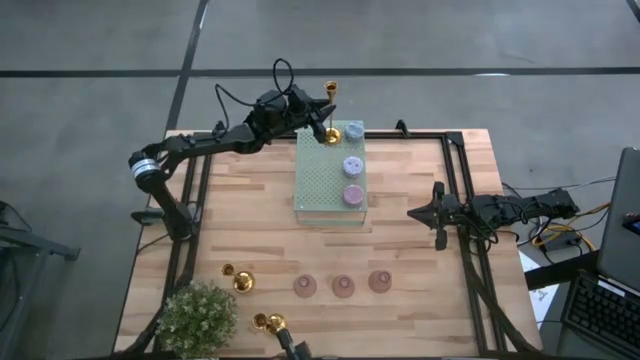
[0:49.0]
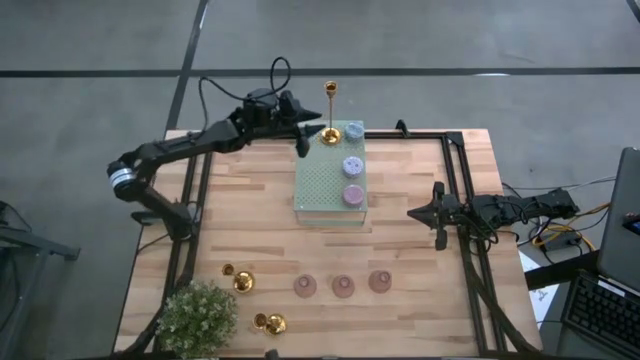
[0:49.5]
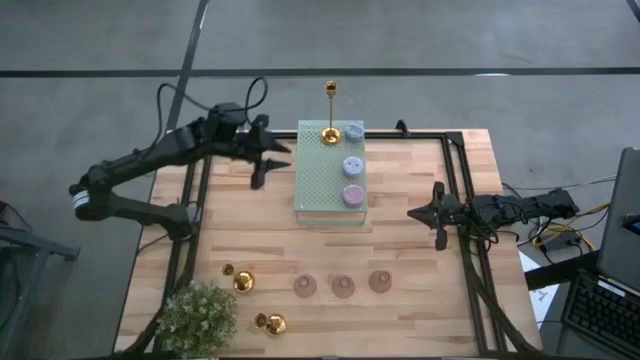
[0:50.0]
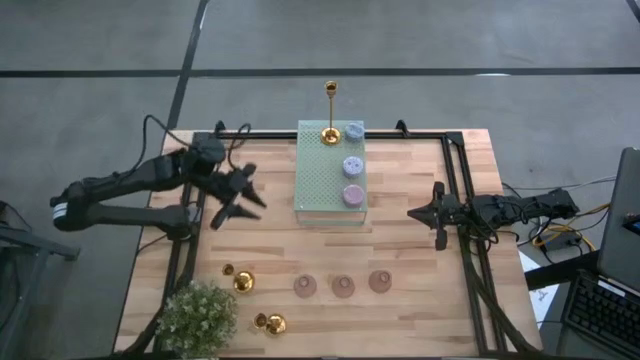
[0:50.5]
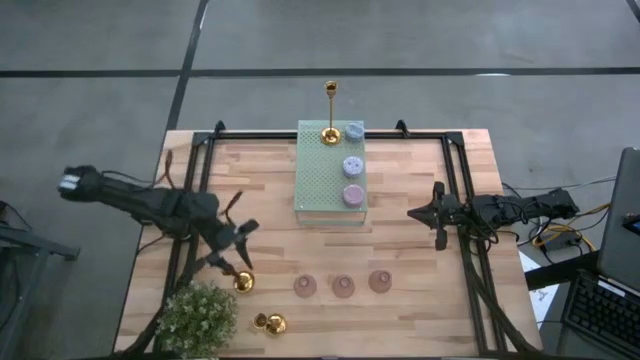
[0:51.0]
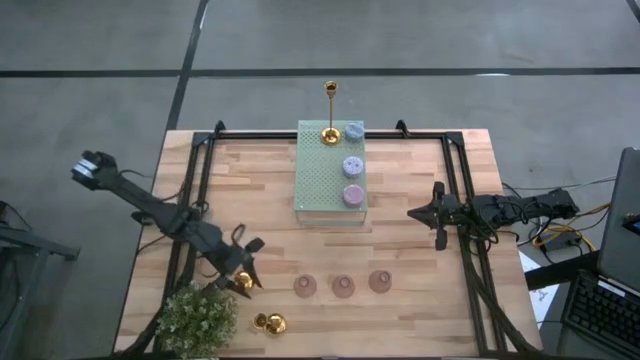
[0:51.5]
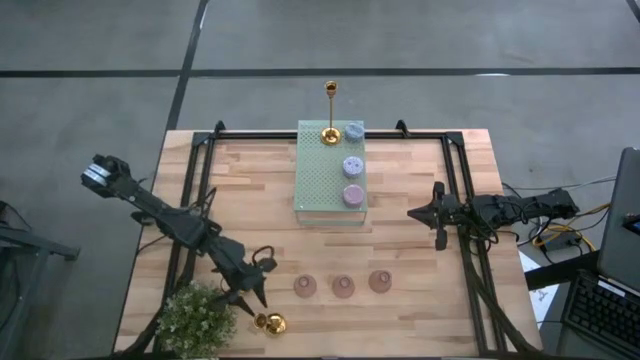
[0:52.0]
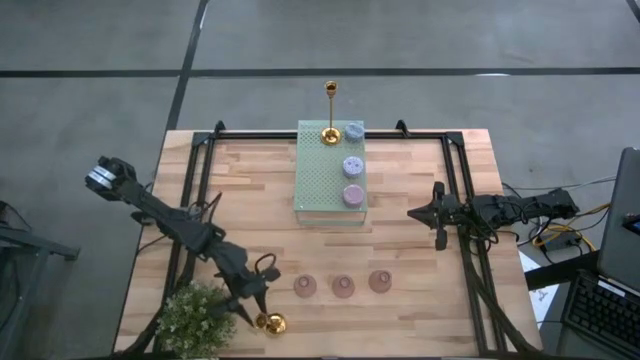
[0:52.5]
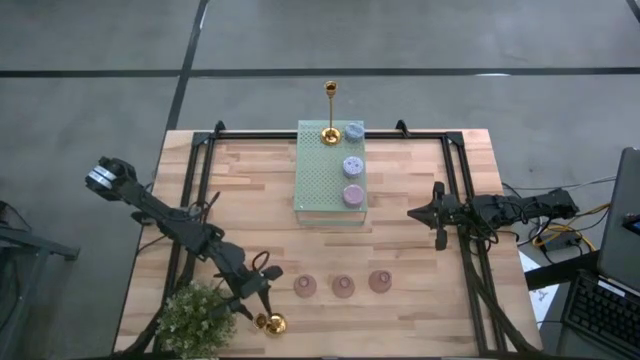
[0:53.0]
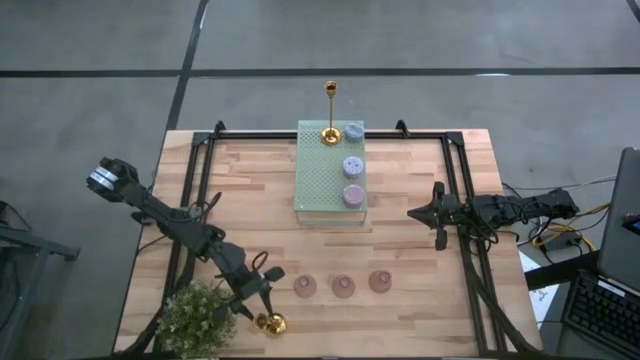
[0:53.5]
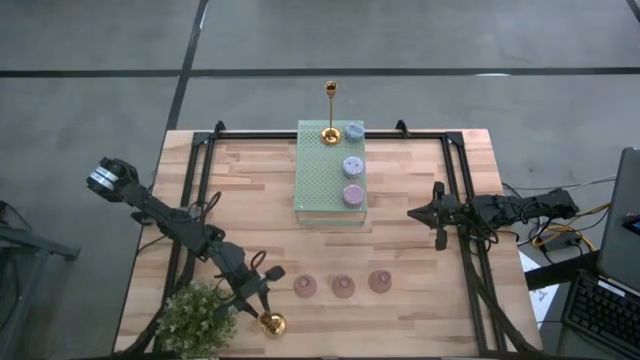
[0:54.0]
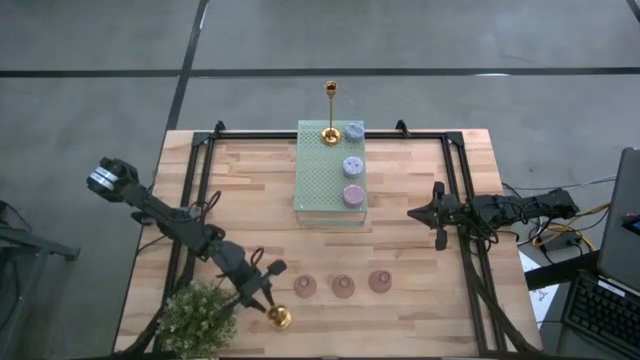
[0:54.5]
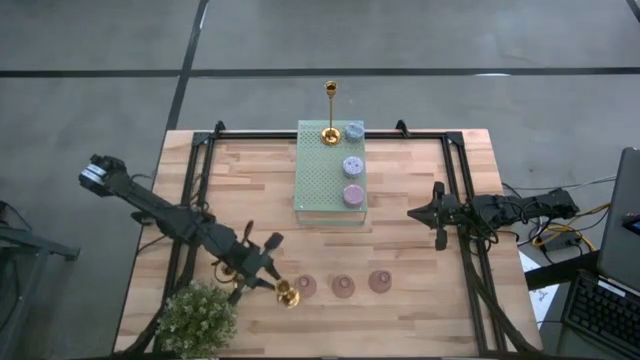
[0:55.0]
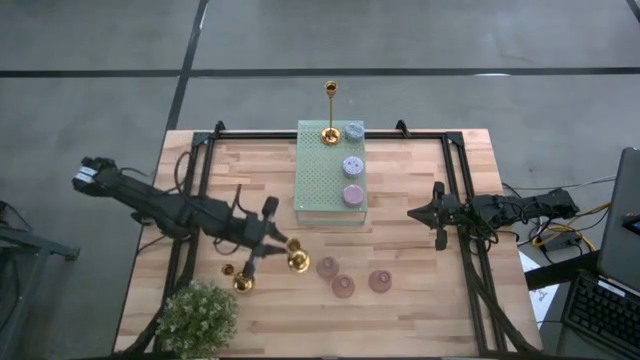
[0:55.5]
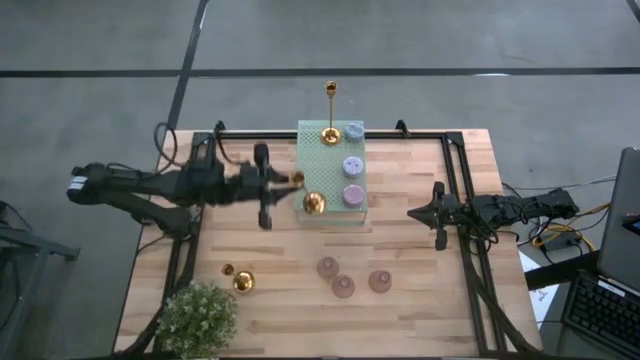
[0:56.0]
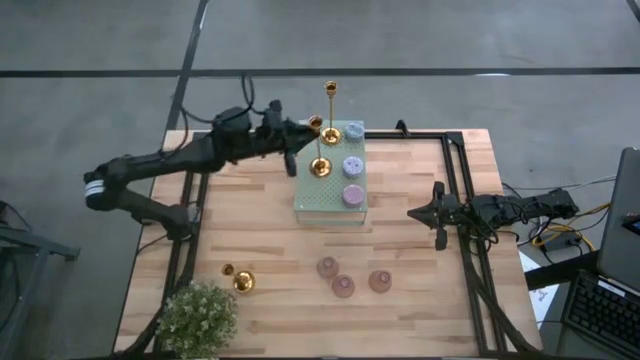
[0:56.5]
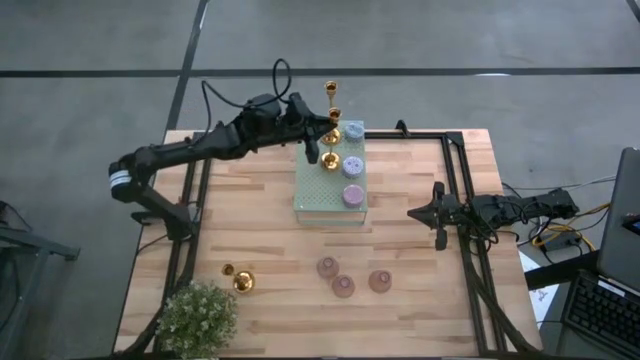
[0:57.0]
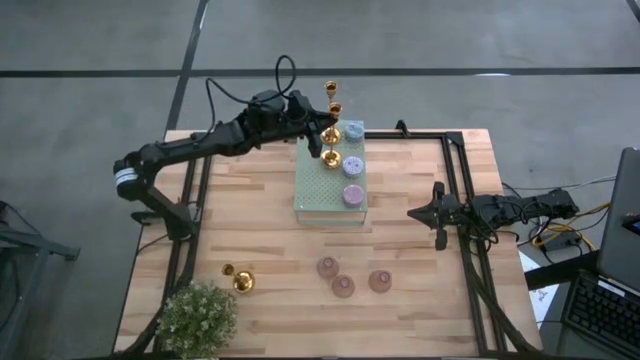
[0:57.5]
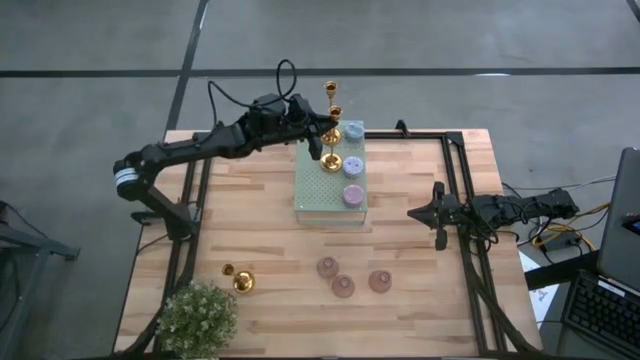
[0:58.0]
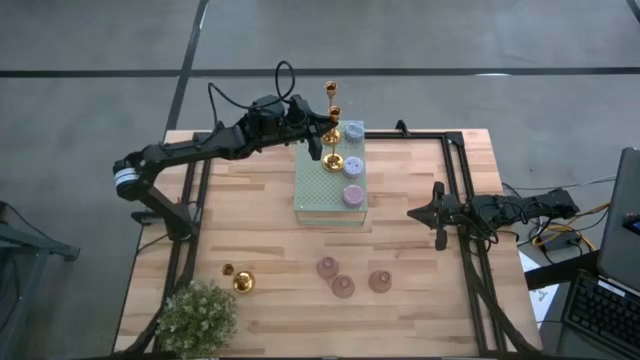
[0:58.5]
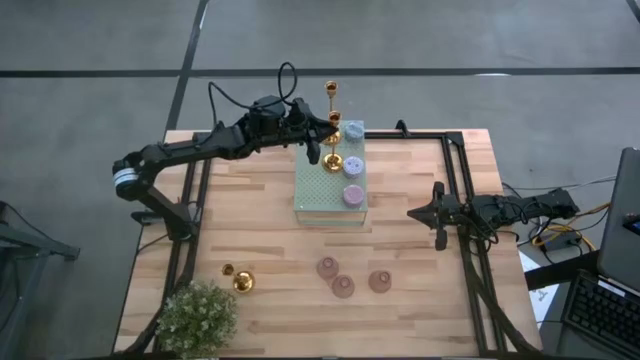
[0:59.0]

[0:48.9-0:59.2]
Task: Pick & Place candle stick holders
Put the bottom gold candle holder on the shelf aligned with the other gold candle holder

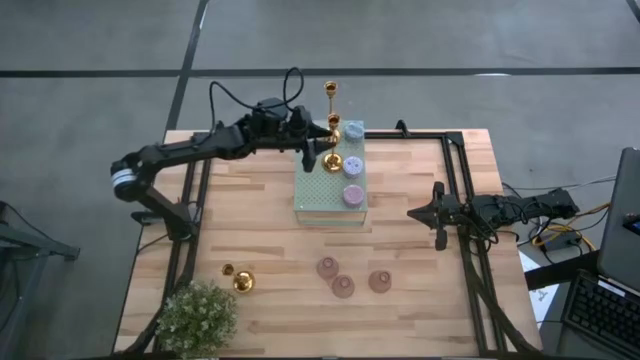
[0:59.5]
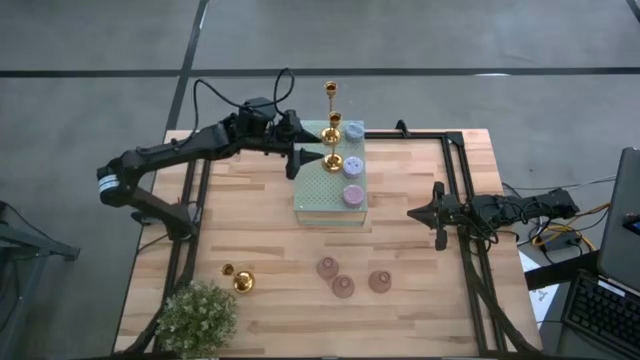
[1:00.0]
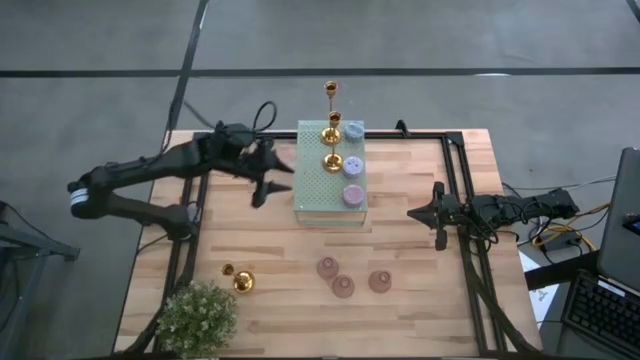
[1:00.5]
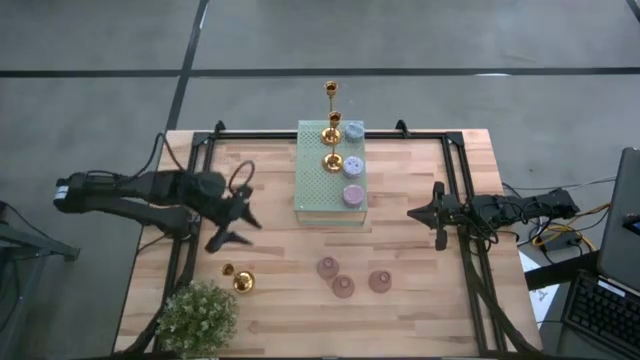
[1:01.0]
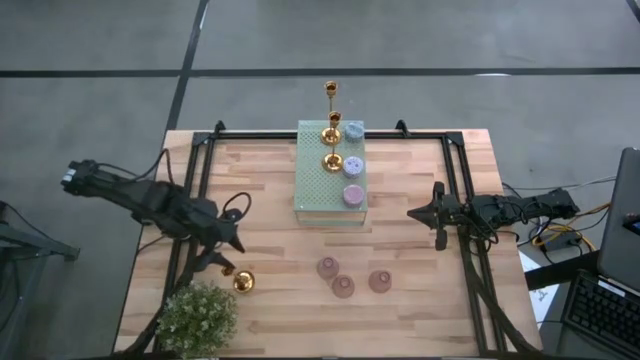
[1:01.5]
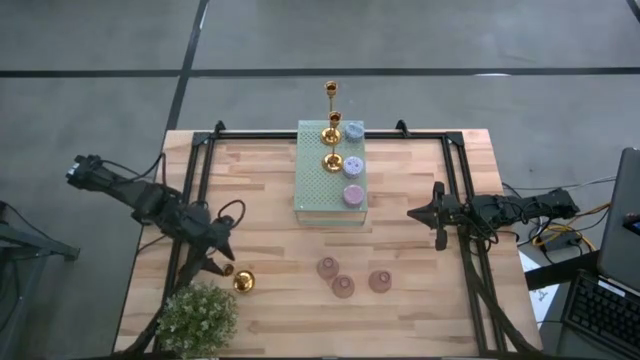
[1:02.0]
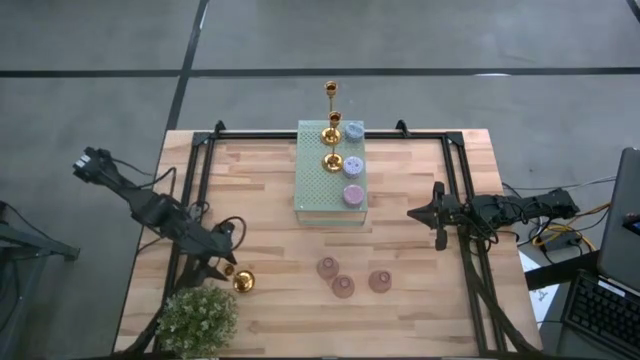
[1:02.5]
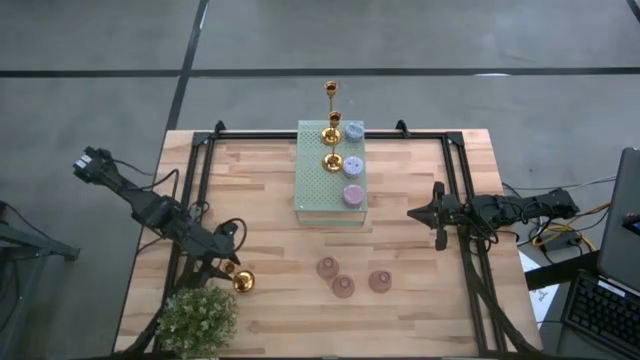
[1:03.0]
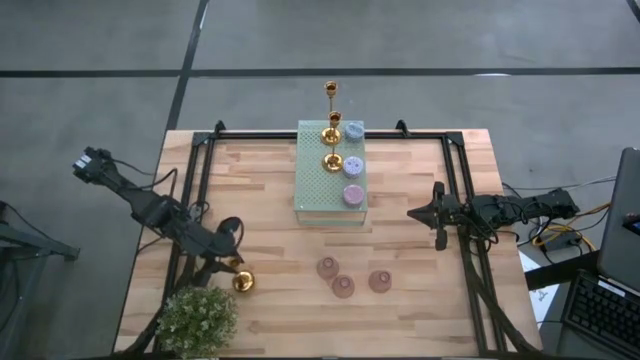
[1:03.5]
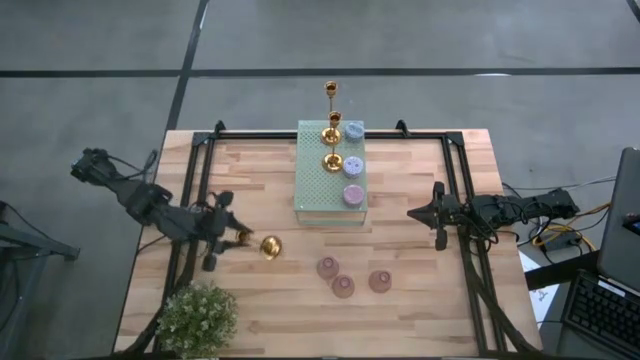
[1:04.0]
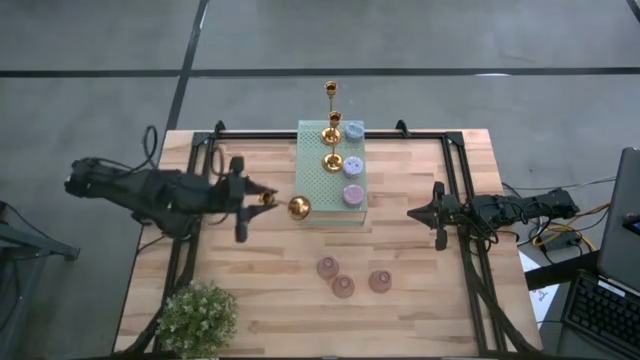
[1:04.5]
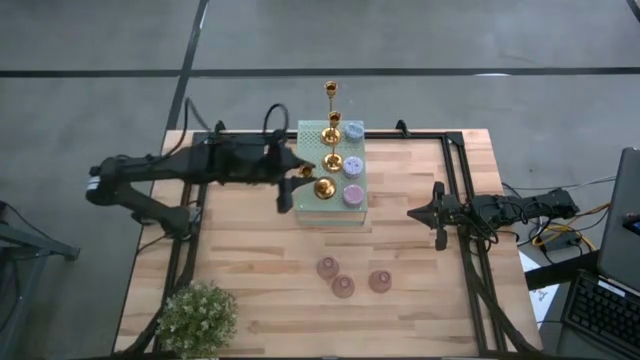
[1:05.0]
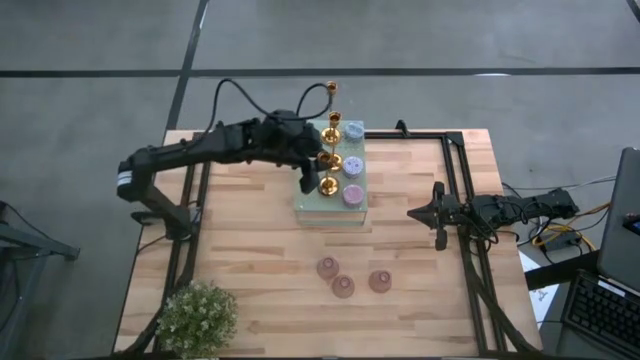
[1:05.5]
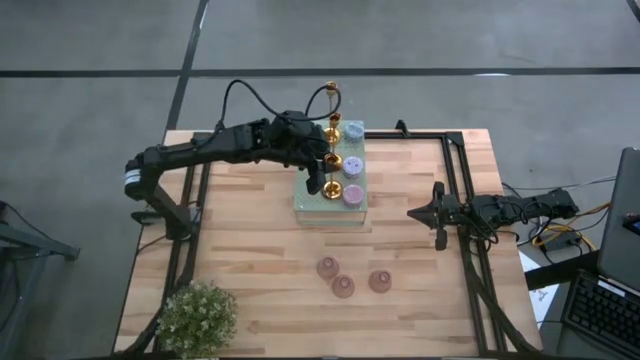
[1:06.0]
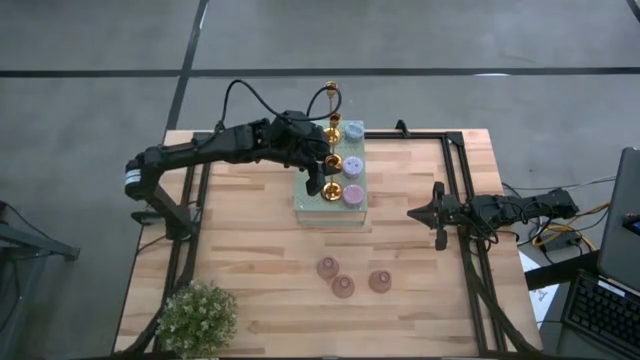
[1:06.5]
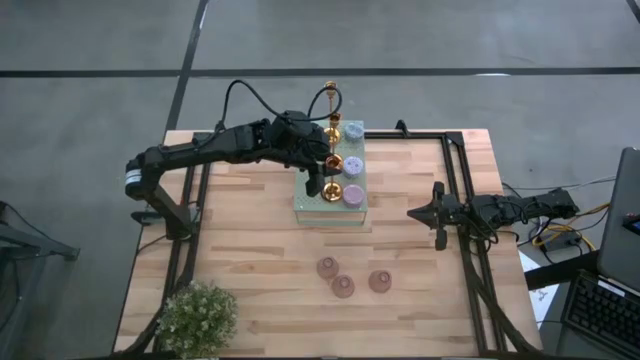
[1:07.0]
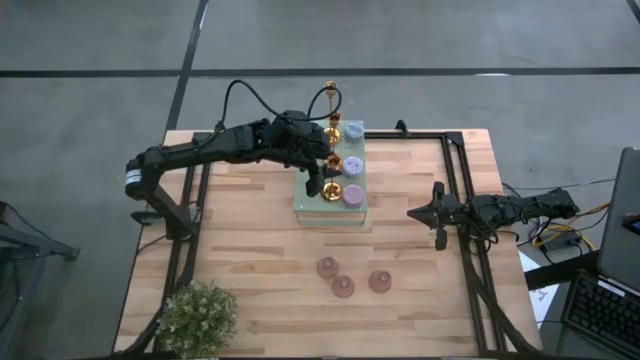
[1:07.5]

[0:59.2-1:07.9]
Put the gold candle holder on the shelf aligned with the other gold candle holders

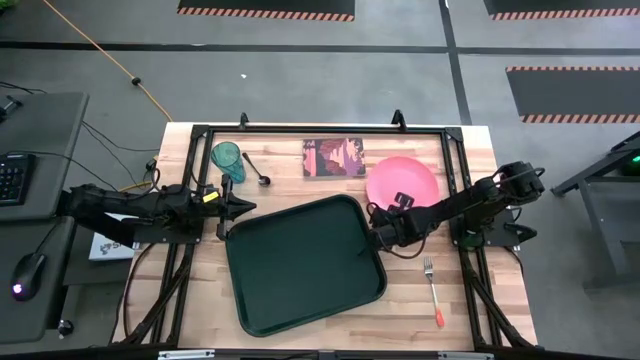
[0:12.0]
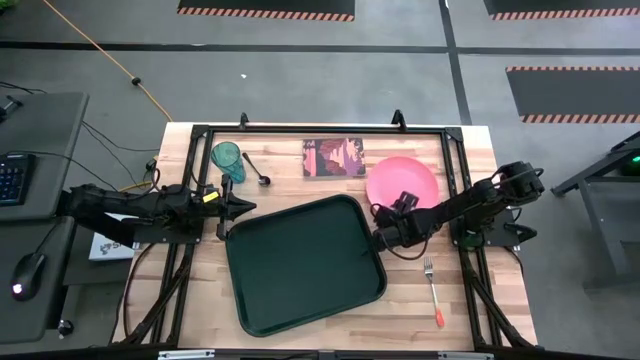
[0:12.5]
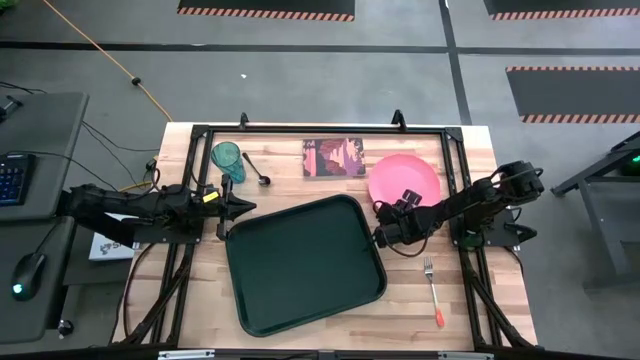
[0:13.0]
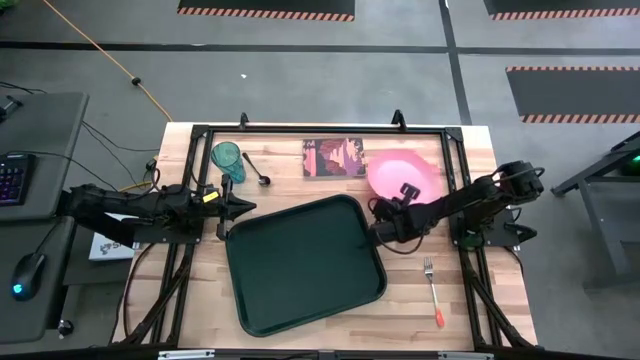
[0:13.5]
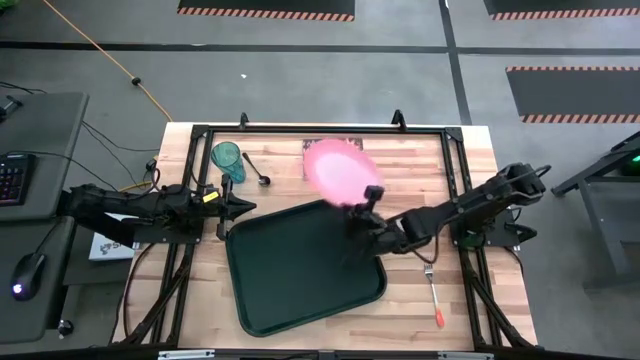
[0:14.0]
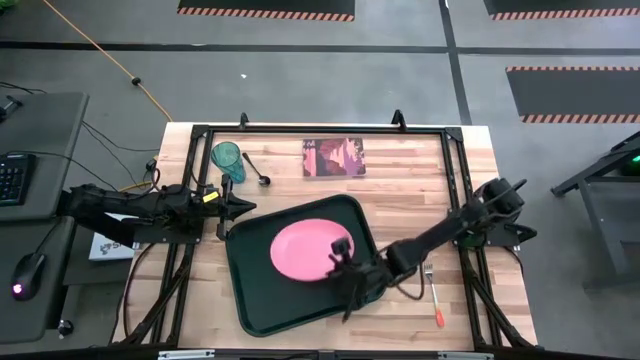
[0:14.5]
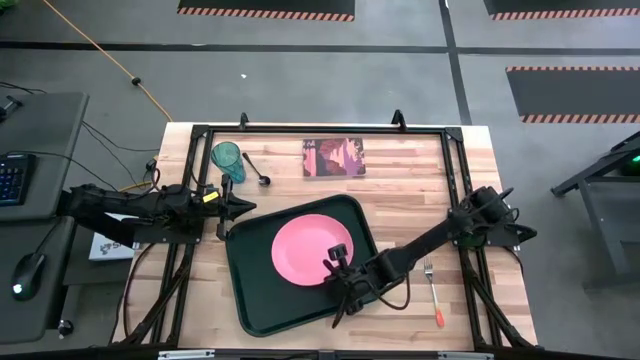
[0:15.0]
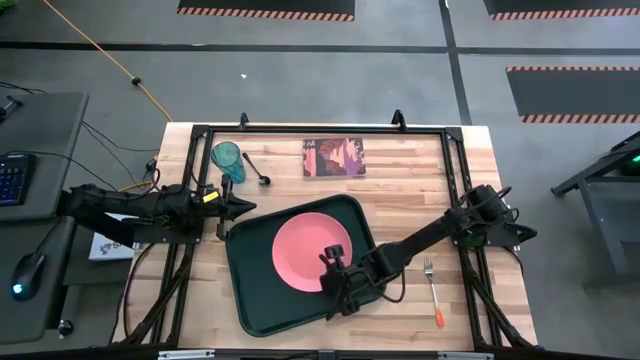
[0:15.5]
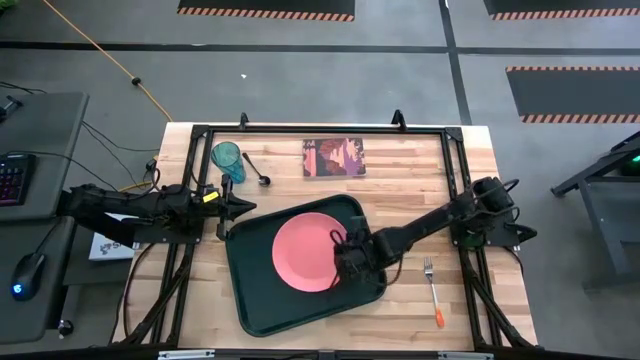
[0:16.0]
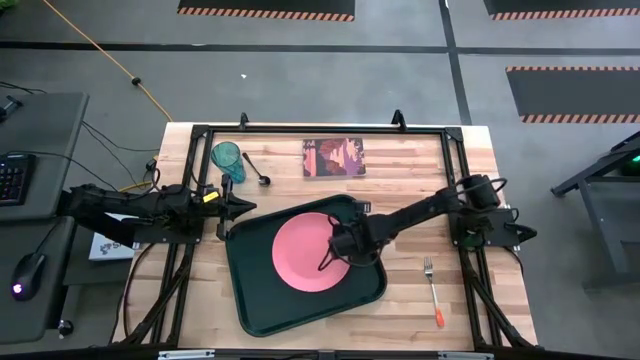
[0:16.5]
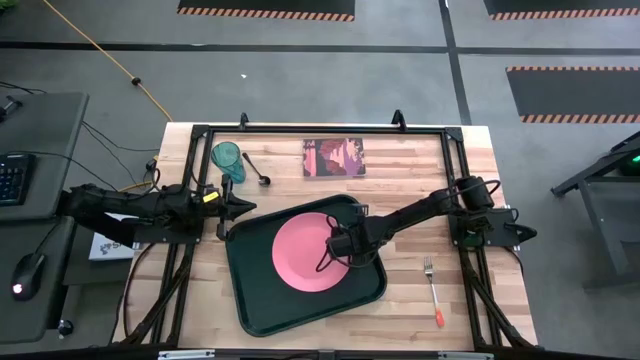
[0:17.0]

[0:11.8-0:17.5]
Task: Pick and place plate/cup/fork/spoon on tray
Put the pink plate on the center of the black serving tray
